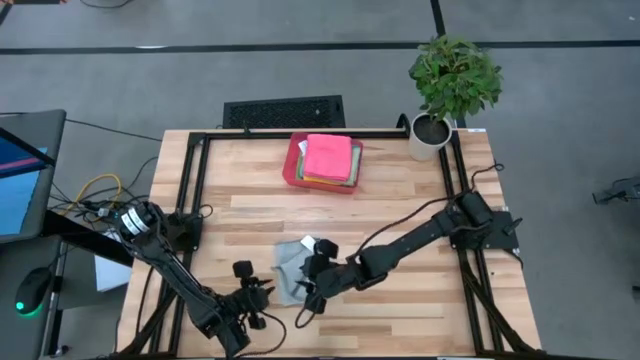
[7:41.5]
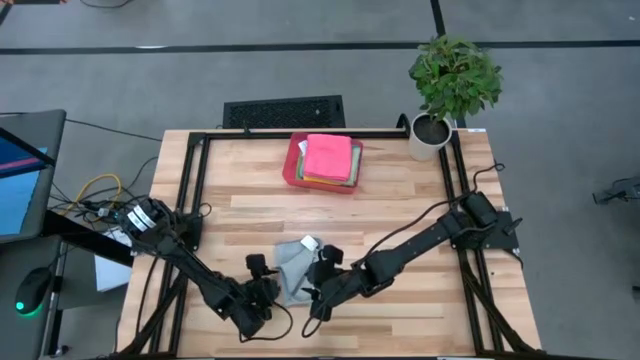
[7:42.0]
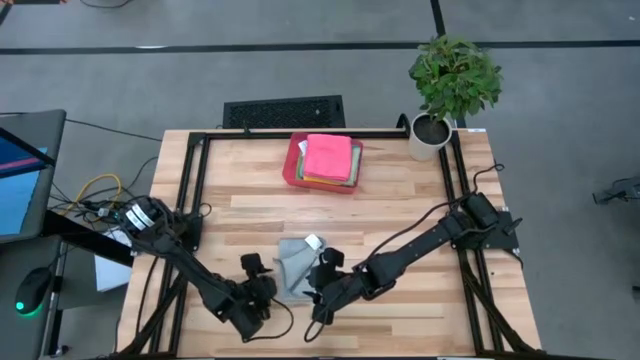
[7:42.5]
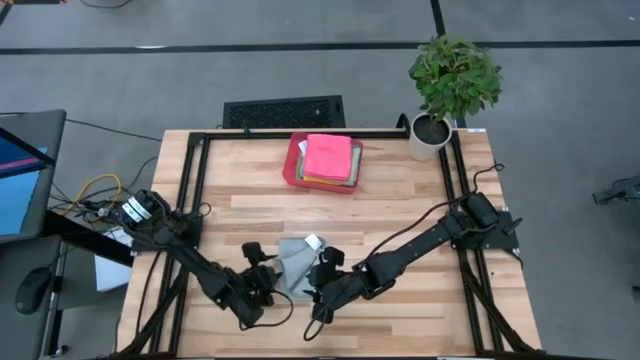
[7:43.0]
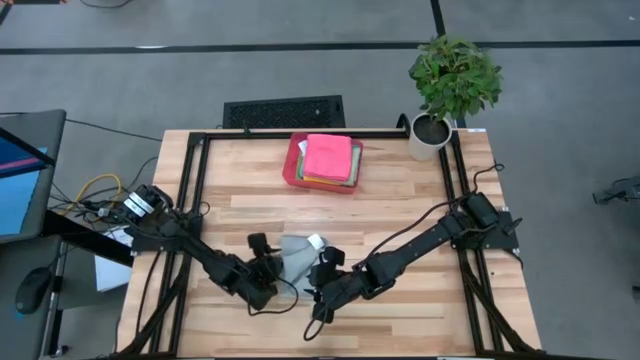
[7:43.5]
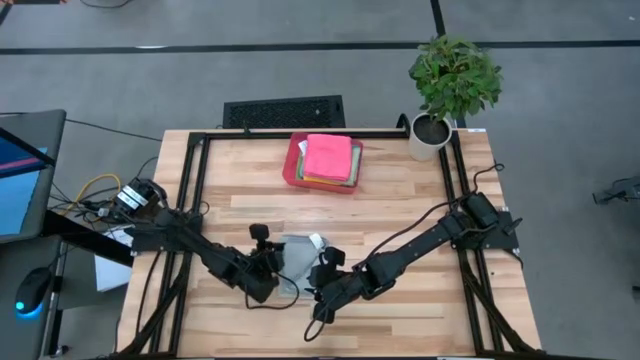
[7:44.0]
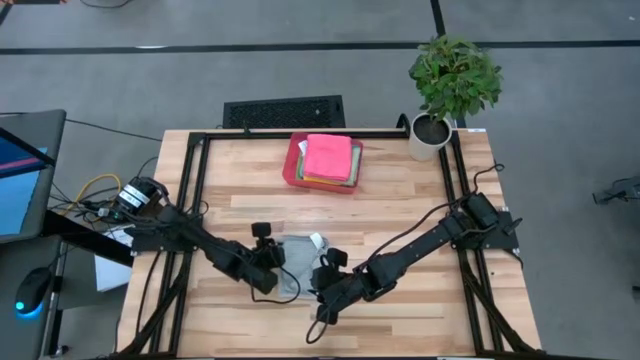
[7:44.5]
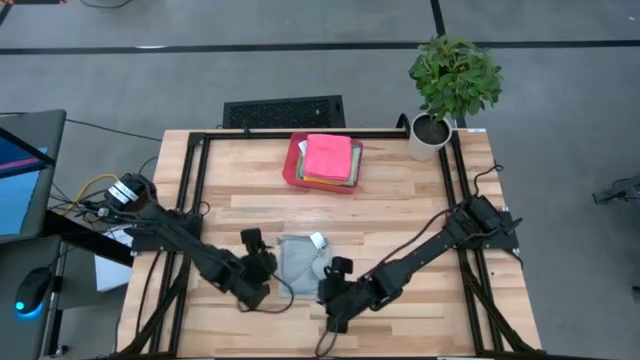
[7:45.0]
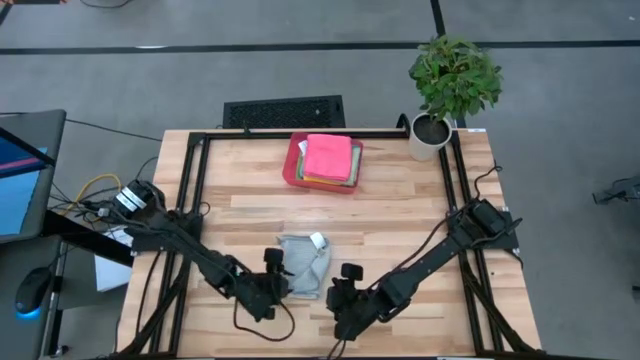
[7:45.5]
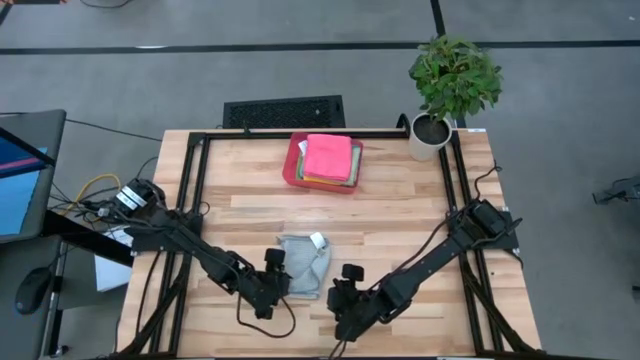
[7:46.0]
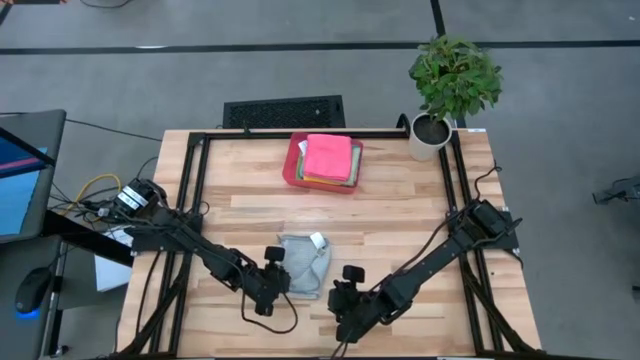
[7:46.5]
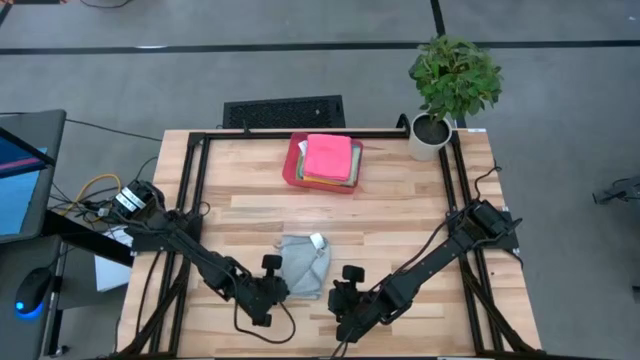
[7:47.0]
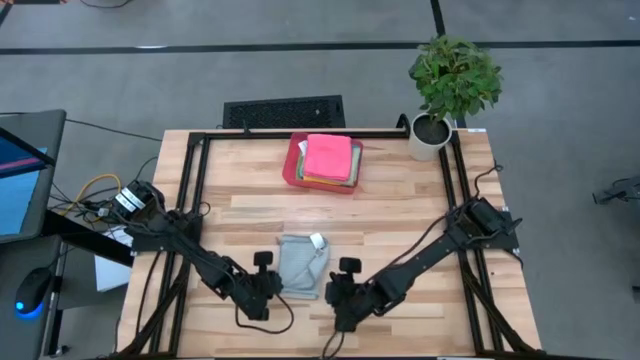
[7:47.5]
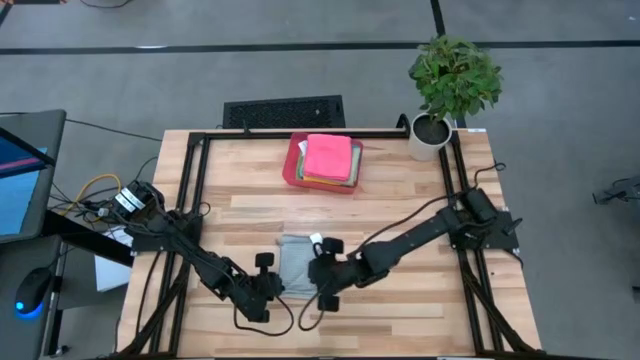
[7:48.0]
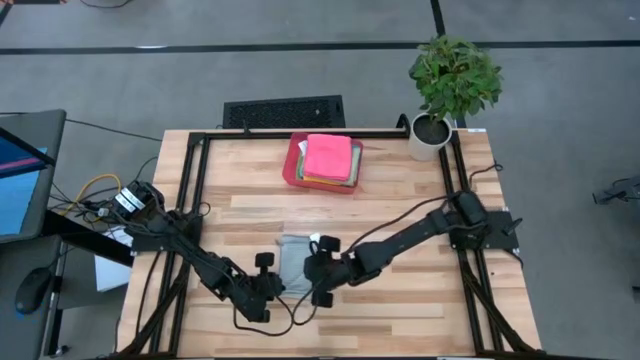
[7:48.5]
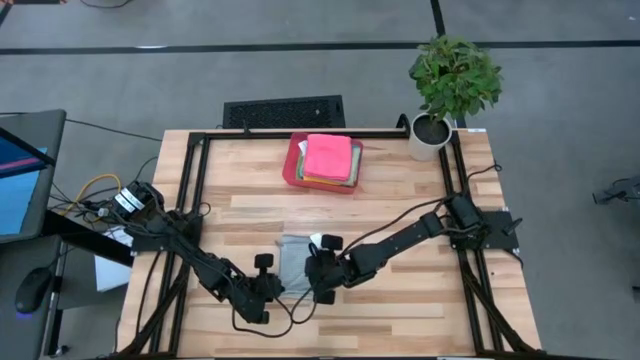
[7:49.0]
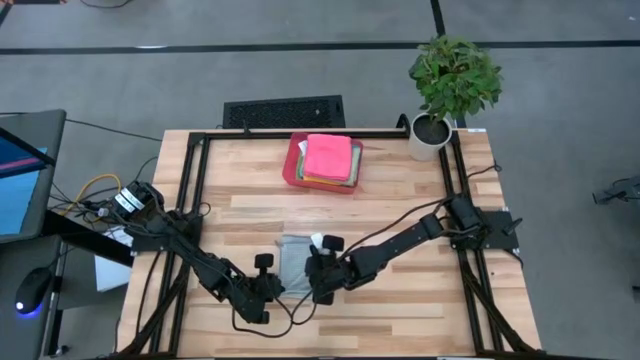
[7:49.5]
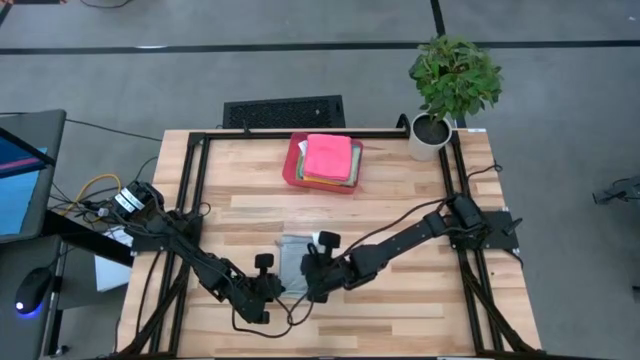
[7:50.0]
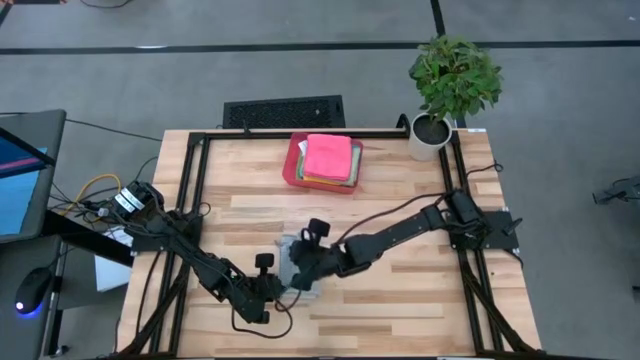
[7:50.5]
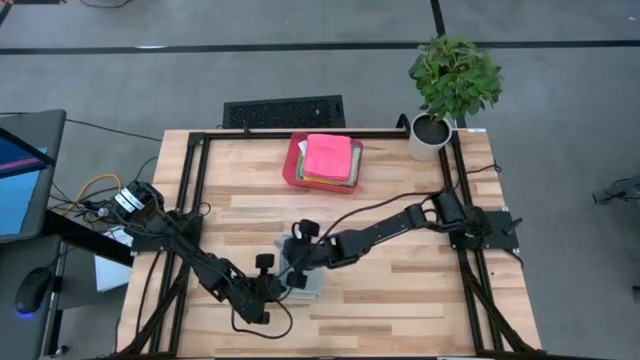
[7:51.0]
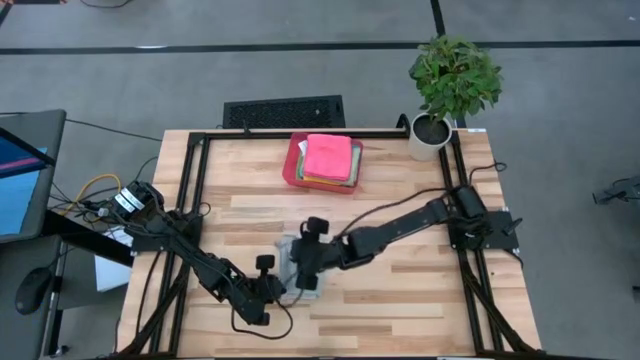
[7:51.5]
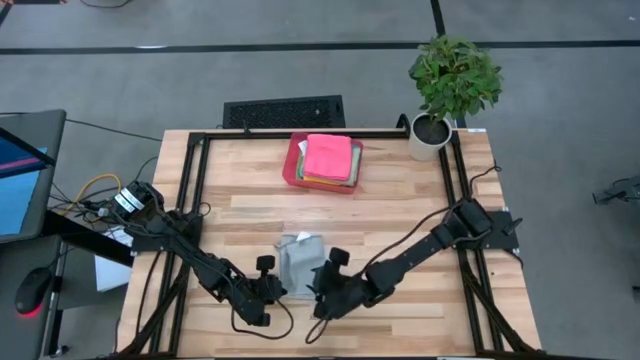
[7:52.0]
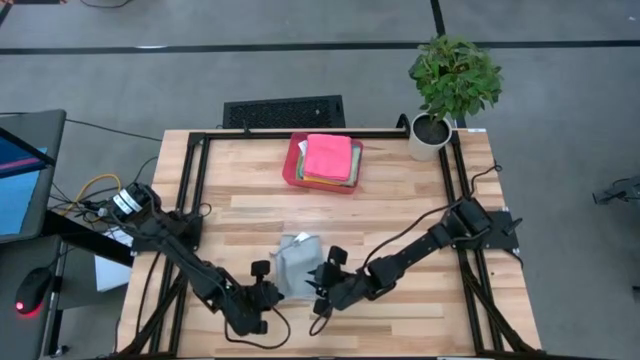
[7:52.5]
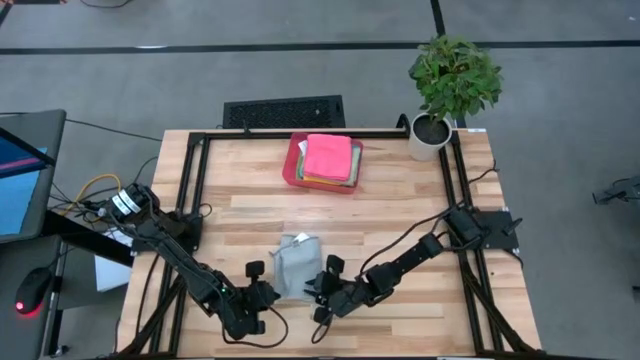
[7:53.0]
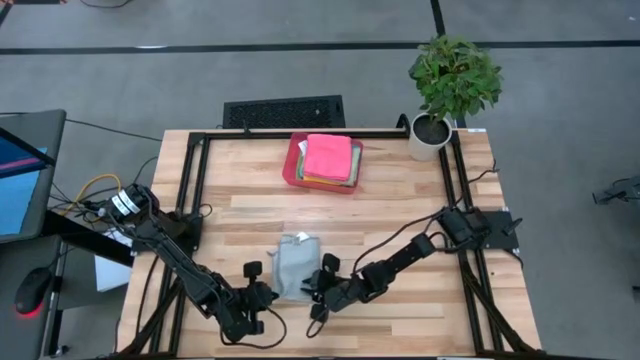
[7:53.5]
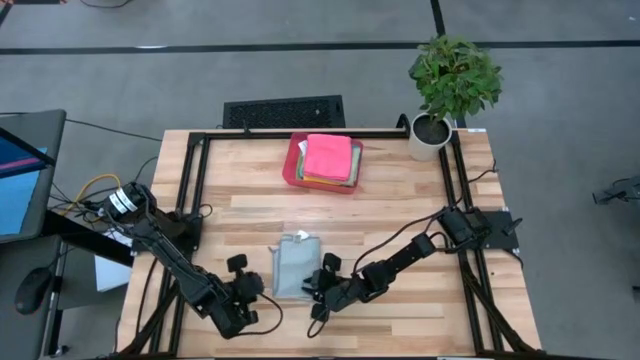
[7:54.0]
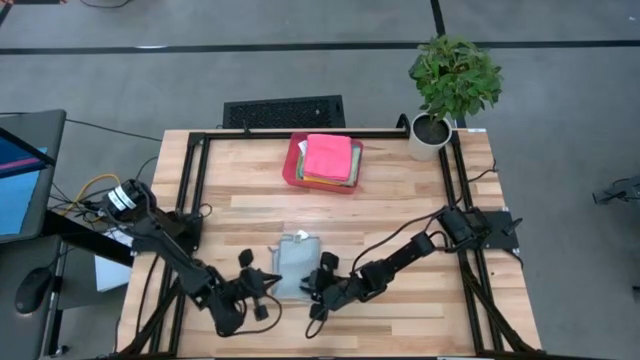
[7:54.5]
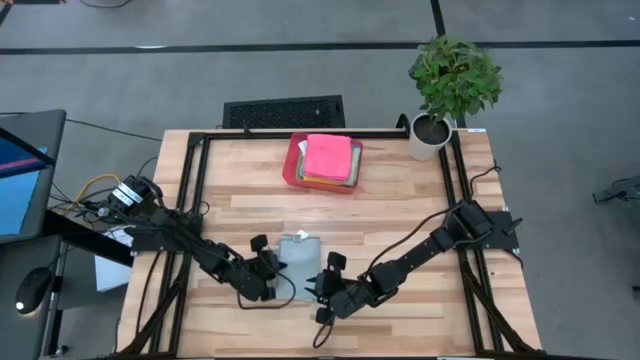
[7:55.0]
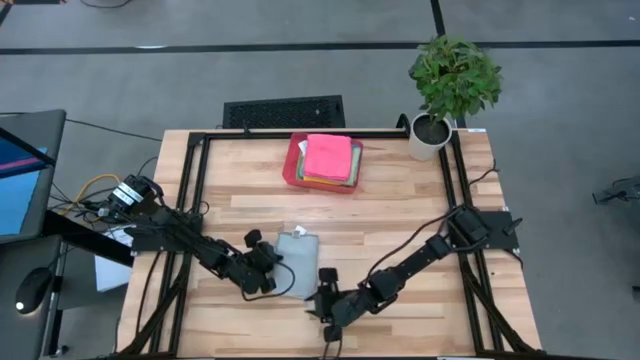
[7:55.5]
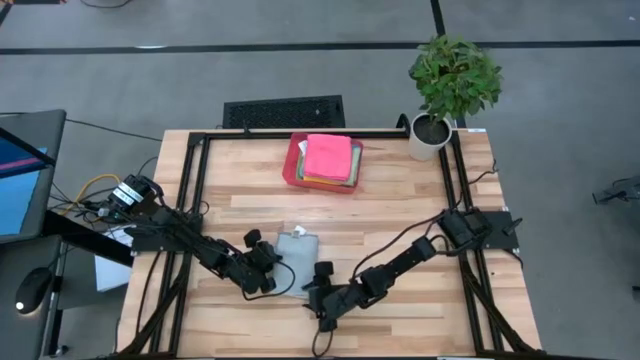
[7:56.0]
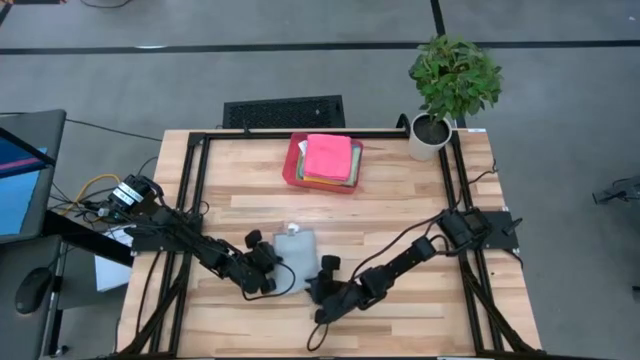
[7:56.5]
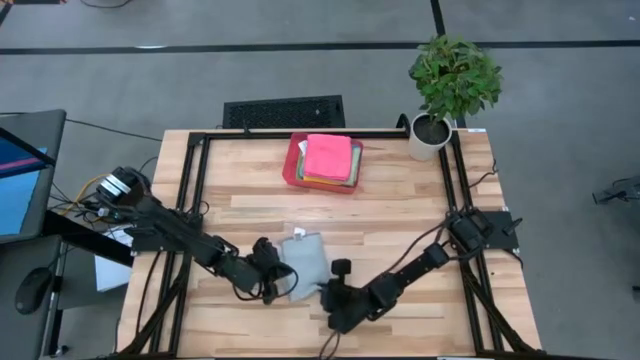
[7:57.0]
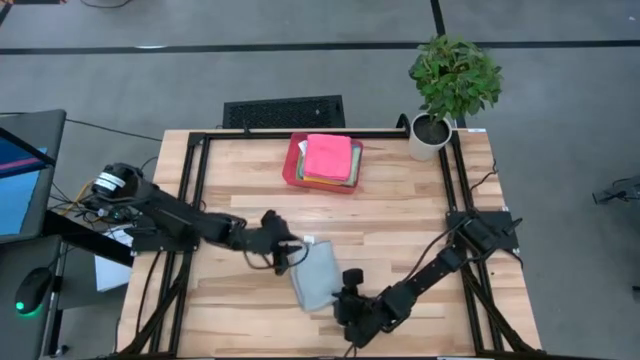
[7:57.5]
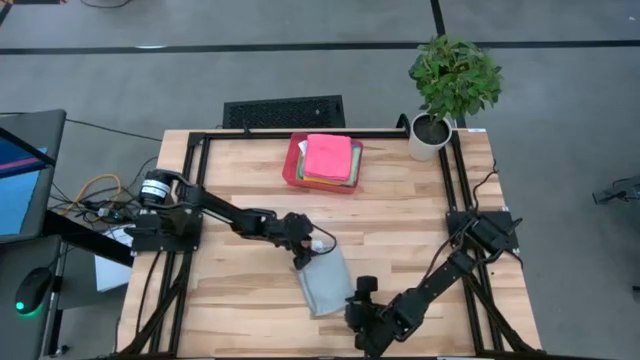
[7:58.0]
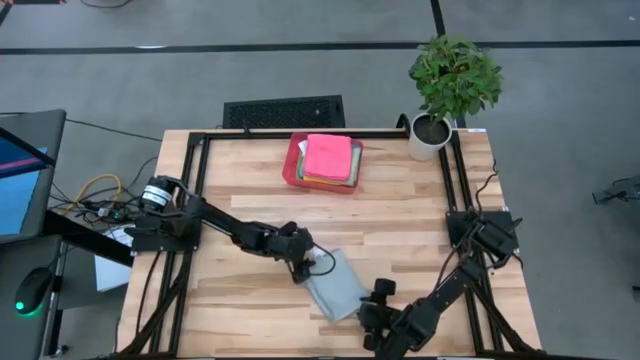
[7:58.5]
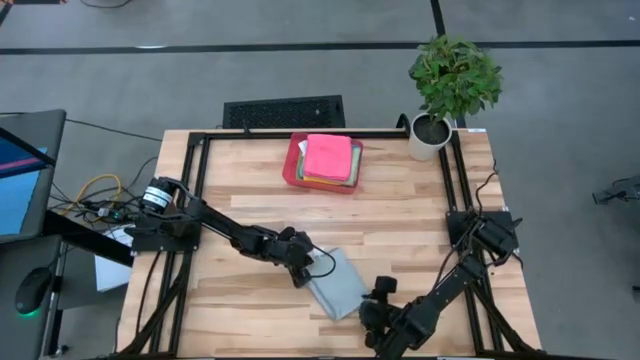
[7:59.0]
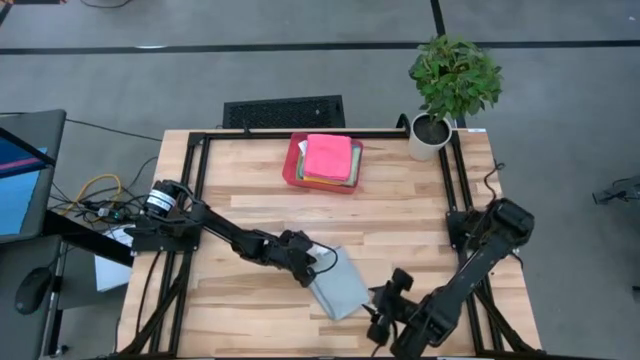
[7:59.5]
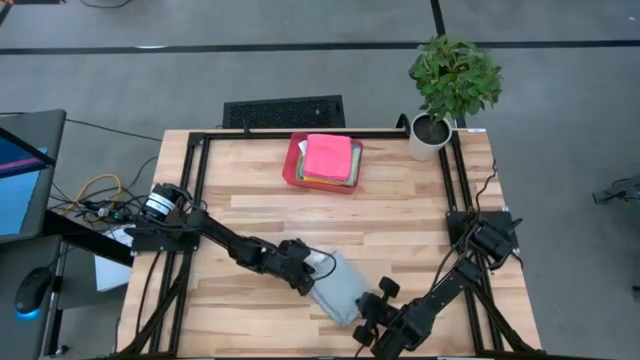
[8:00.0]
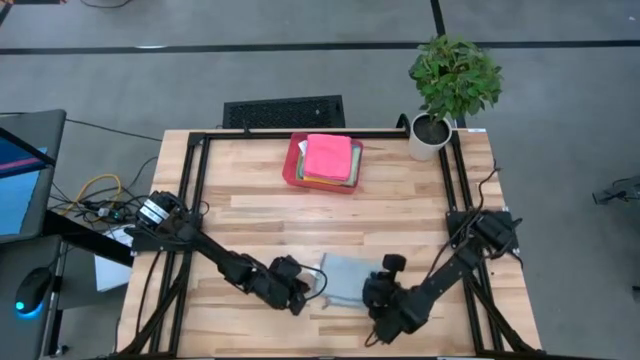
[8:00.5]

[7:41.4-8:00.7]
Task: Fold microfiber towels
Fold the gray microfiber cloth

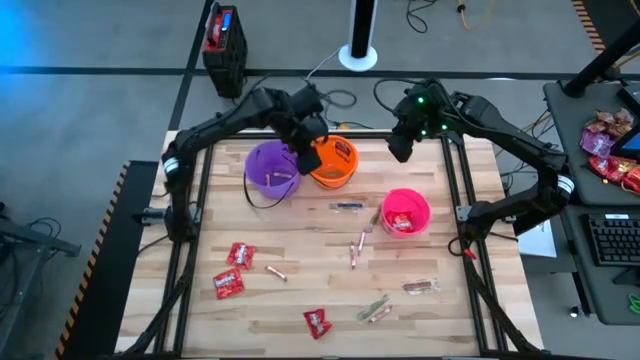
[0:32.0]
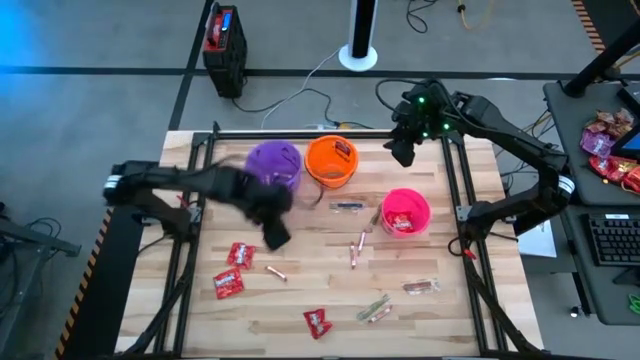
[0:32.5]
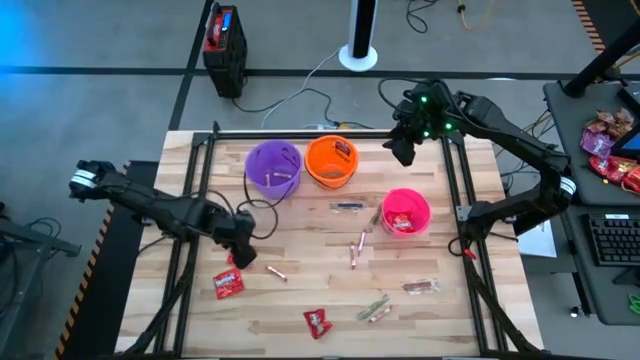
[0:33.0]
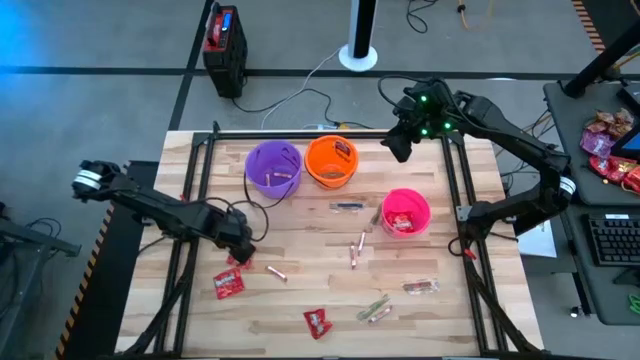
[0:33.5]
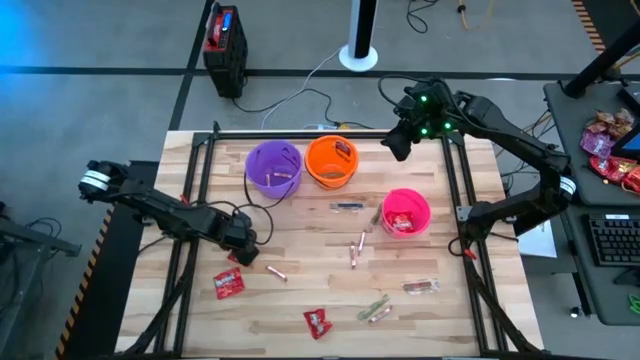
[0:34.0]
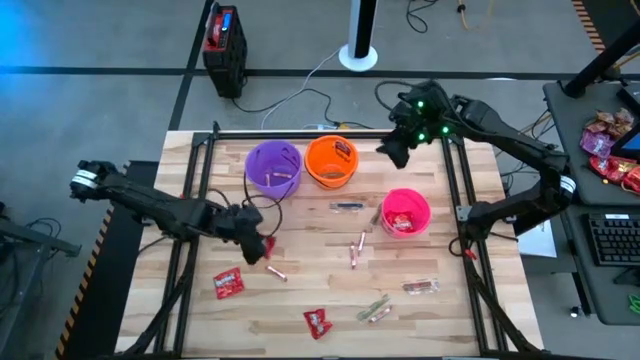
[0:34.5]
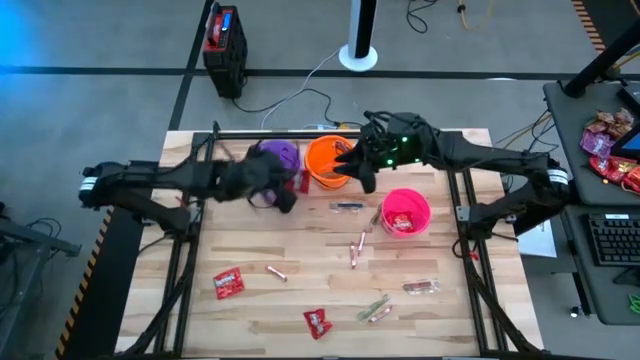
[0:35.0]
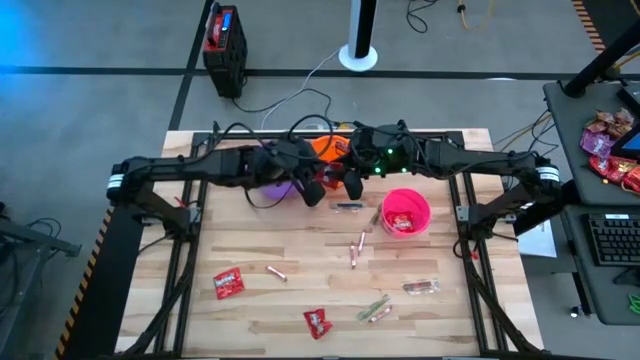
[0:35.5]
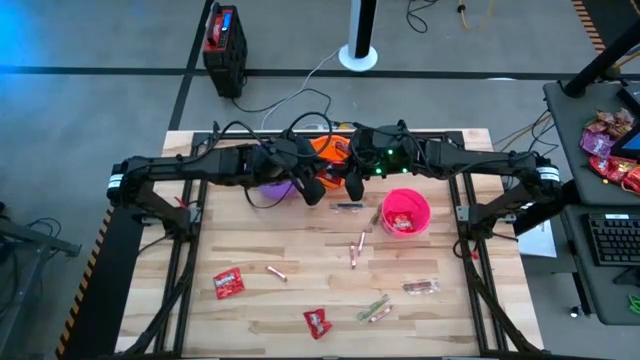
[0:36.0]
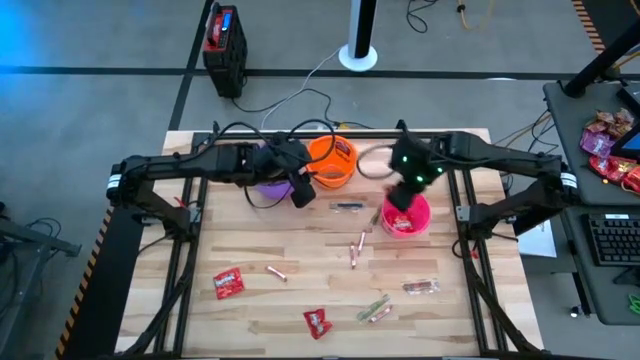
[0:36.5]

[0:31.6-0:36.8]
Task: Sort candy by brand, put in halloween buckets
Put the red candy into the pink bucket
